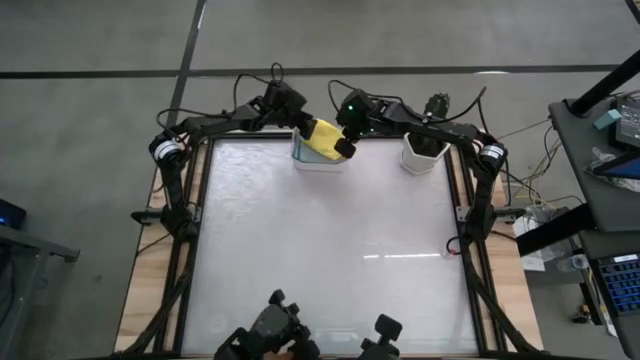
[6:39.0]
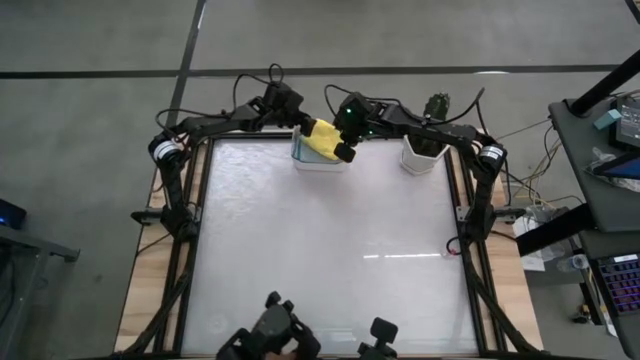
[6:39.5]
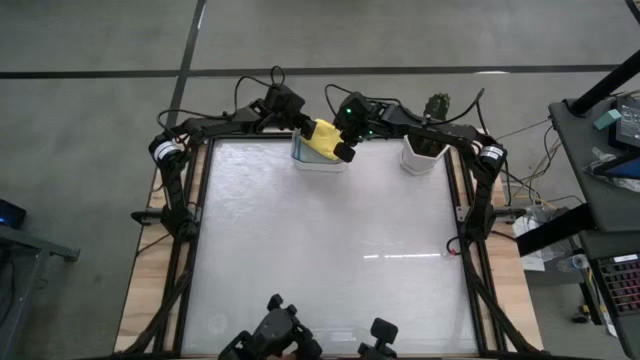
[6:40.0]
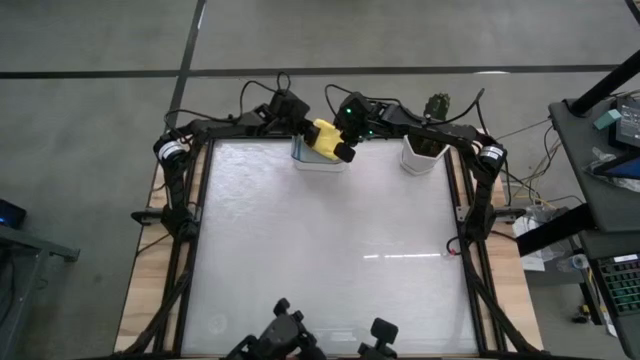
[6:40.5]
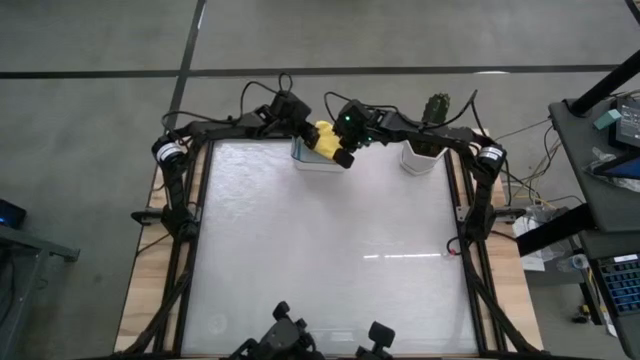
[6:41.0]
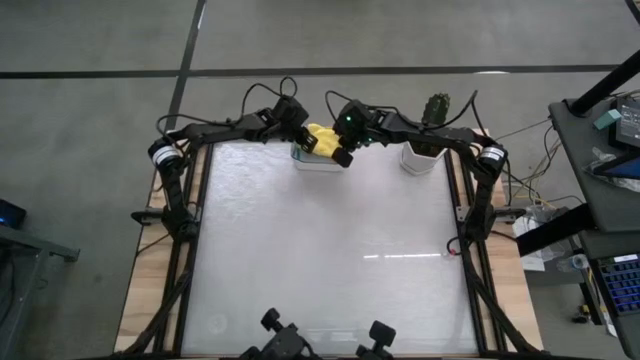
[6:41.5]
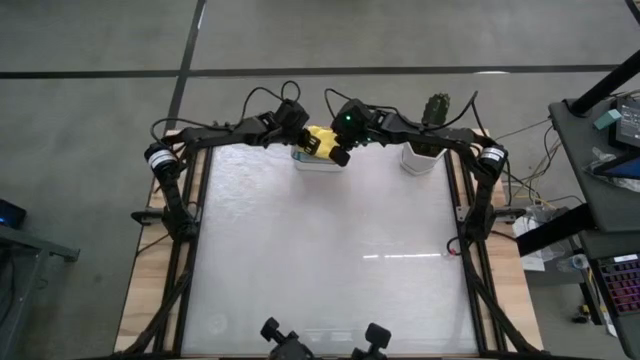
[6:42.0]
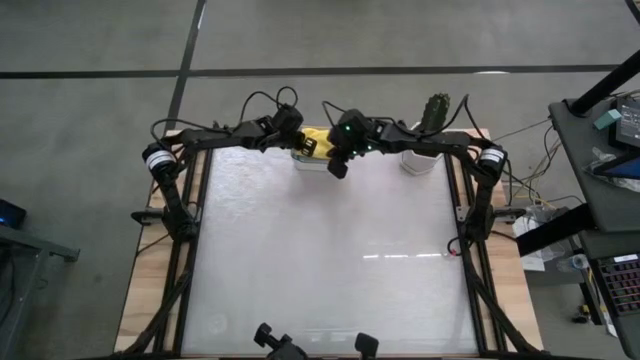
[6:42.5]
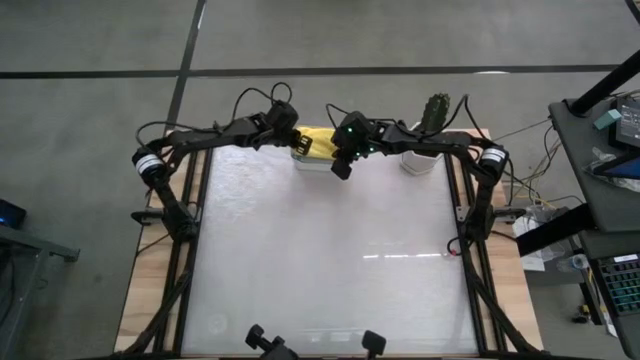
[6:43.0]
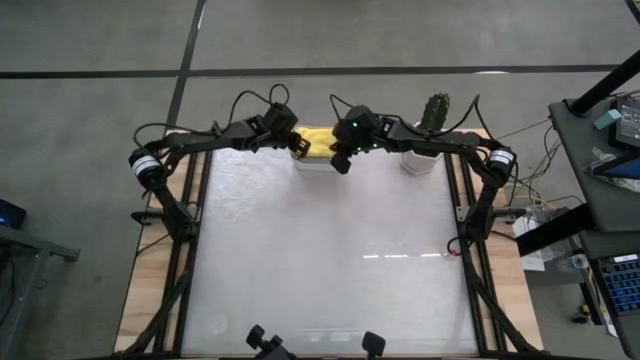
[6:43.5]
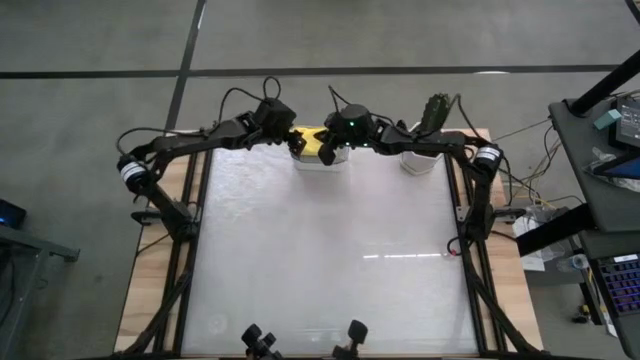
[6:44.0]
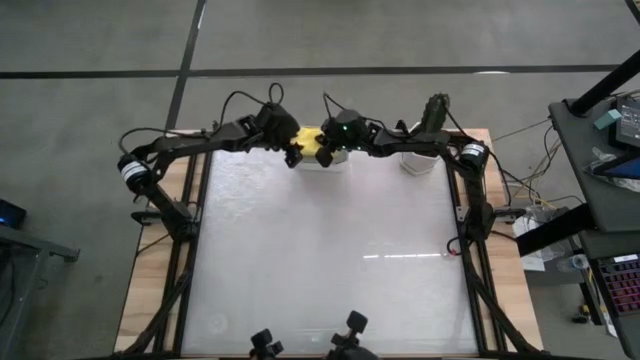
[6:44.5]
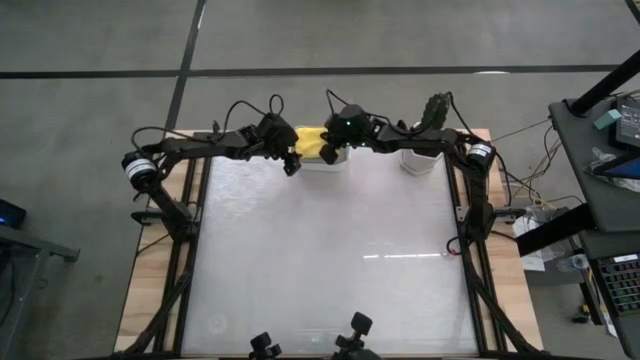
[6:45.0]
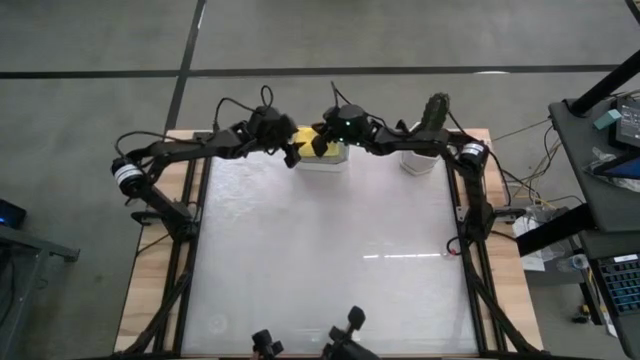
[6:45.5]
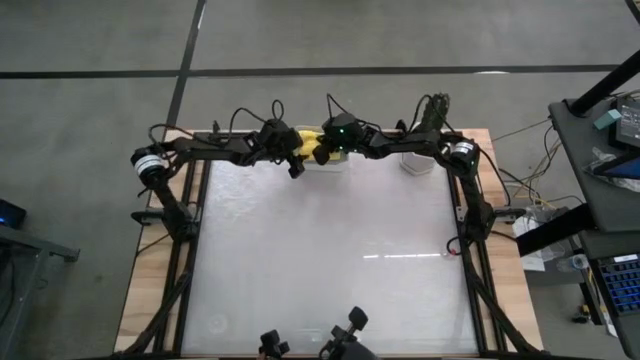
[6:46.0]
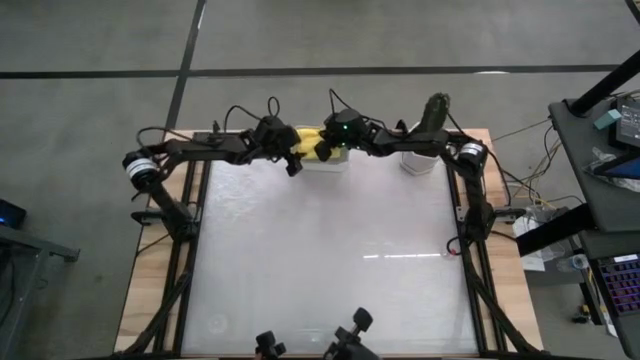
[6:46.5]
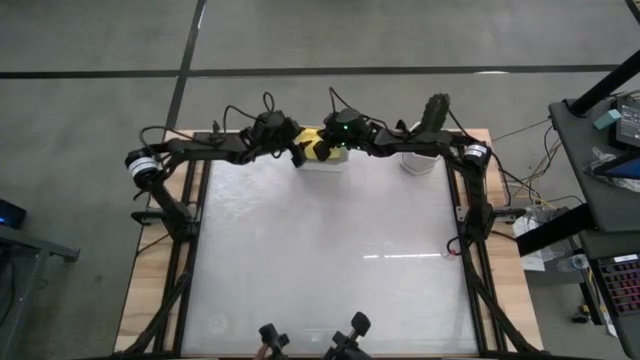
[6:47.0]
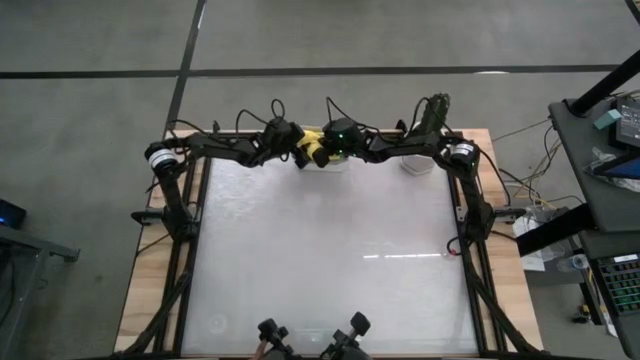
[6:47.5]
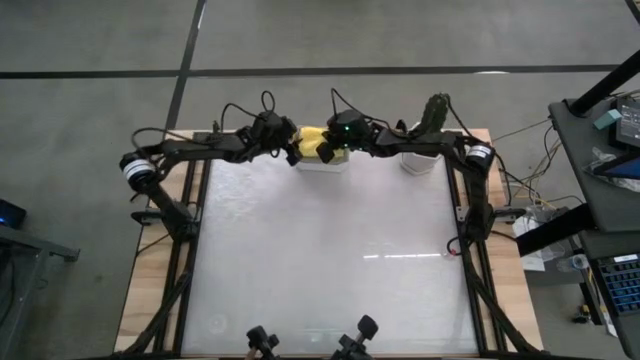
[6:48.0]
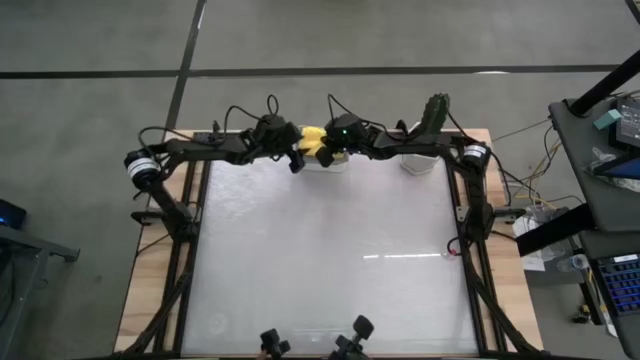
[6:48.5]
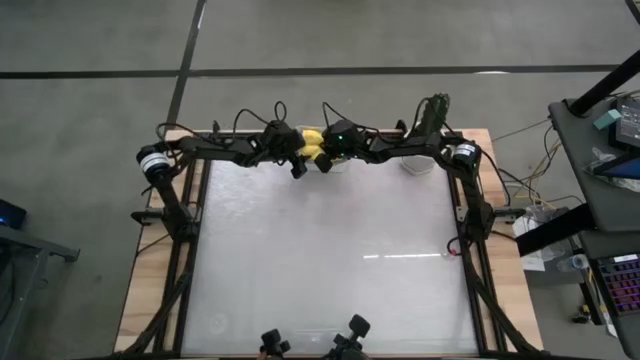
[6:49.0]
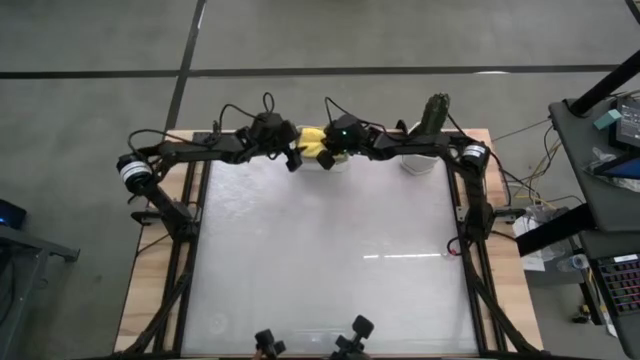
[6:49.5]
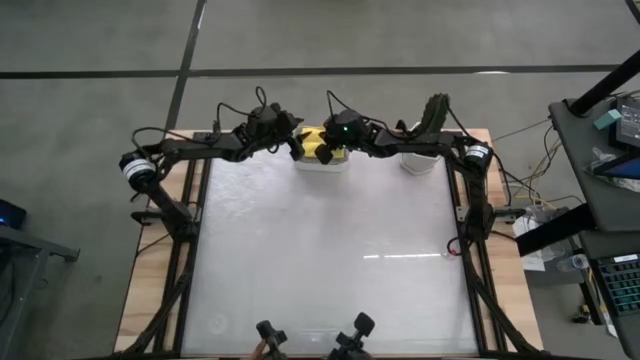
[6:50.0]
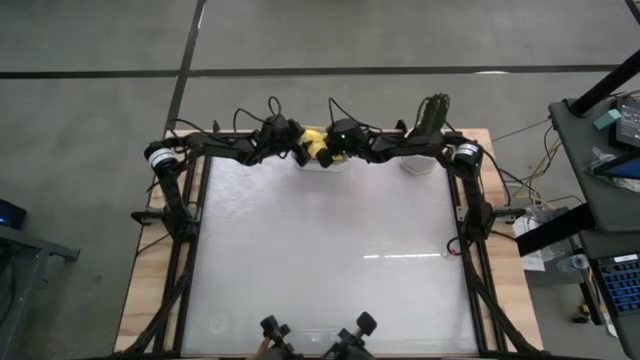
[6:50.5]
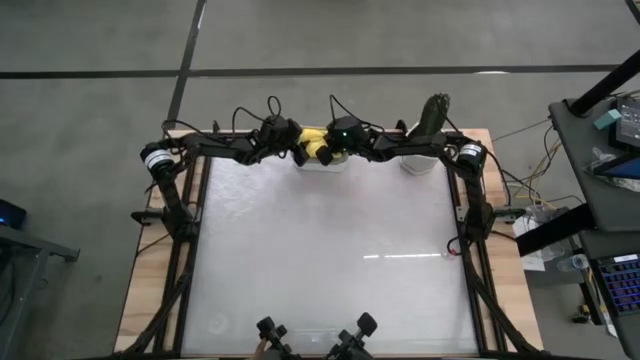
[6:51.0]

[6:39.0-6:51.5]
Task: Fold microfiber towels
Put the yellow cloth into the bin

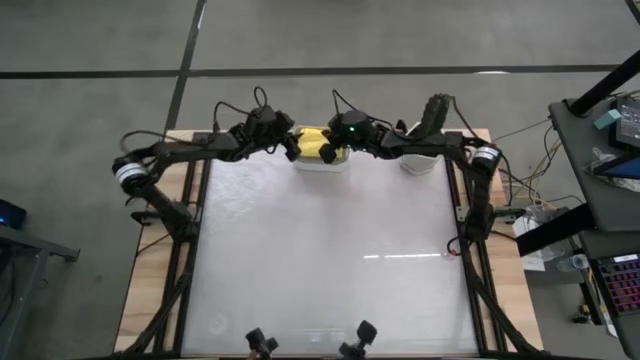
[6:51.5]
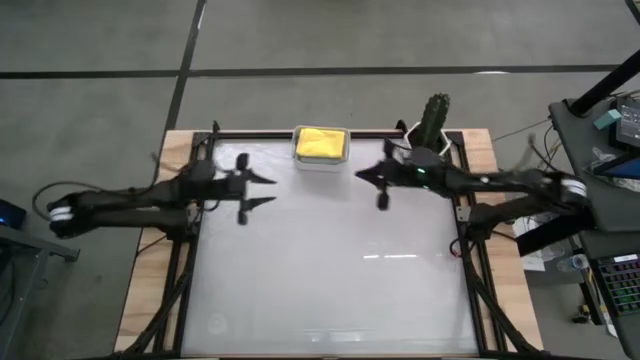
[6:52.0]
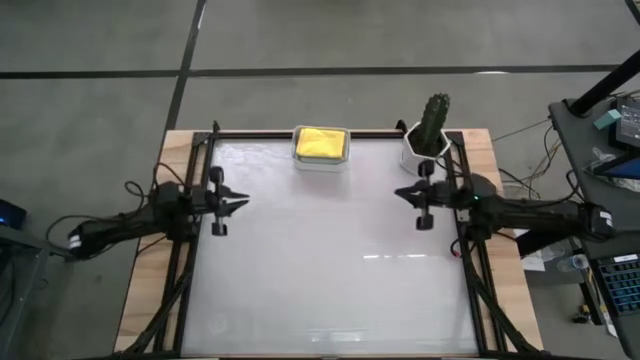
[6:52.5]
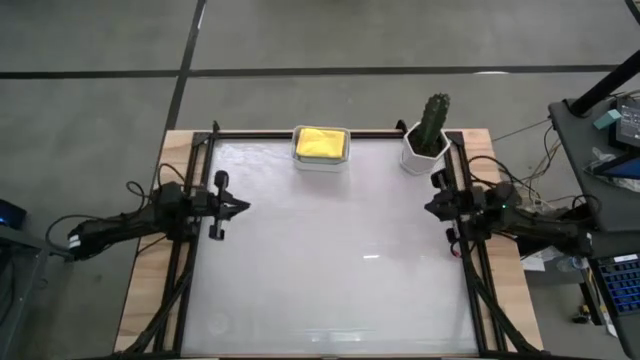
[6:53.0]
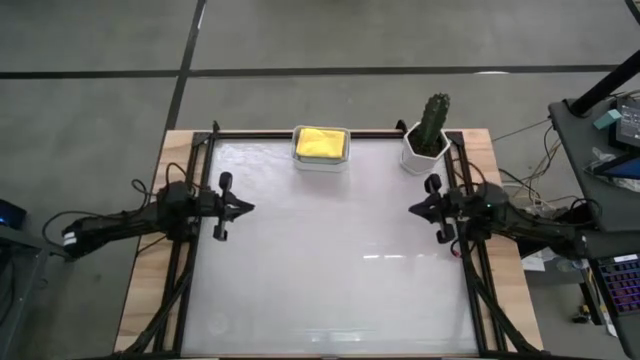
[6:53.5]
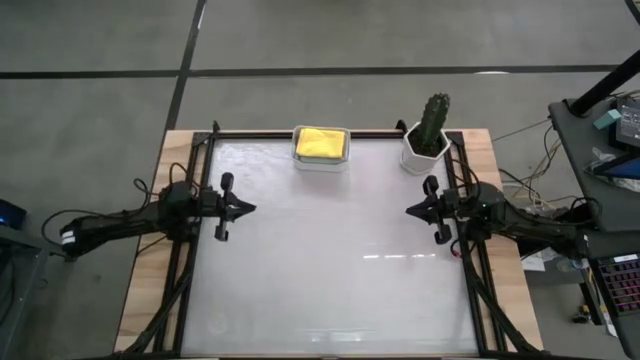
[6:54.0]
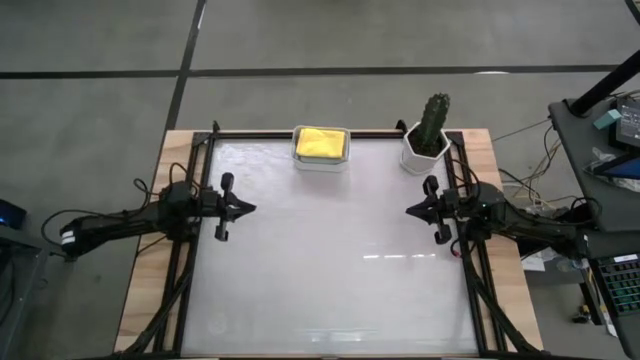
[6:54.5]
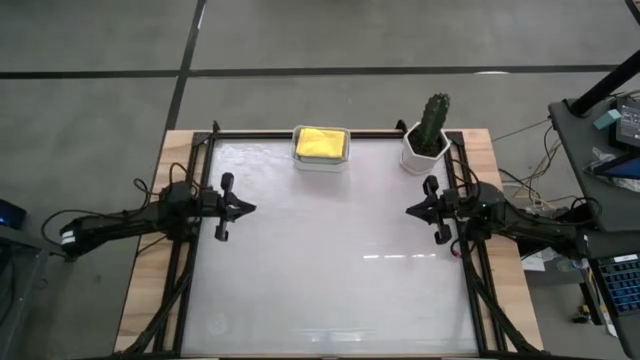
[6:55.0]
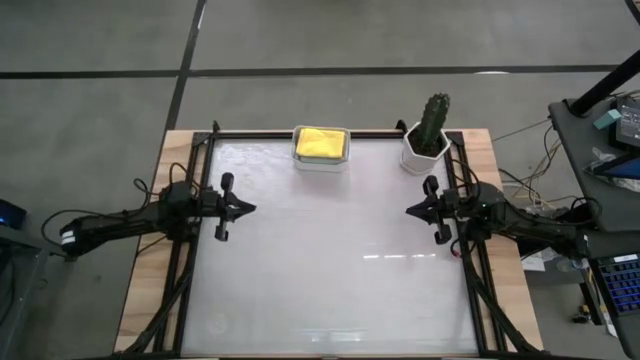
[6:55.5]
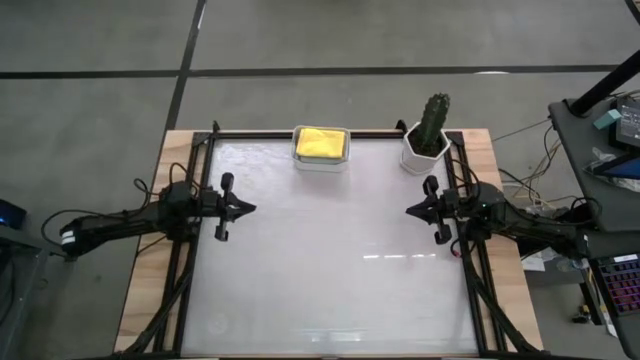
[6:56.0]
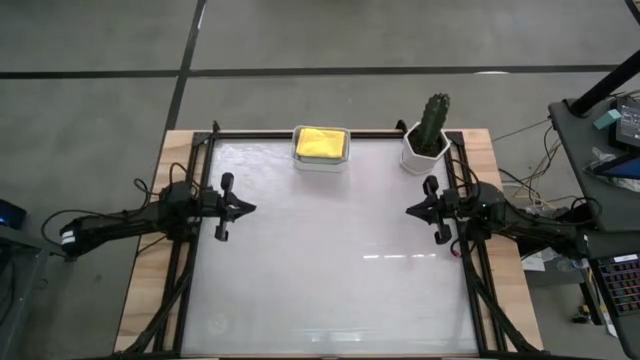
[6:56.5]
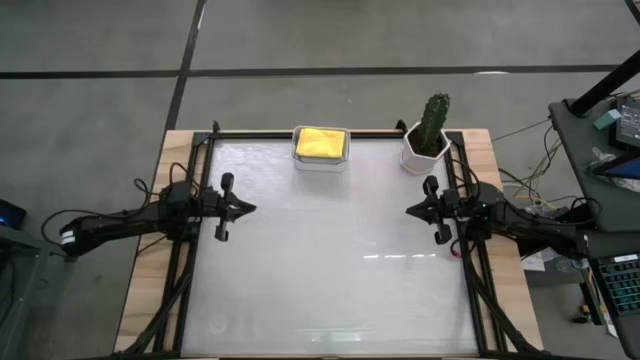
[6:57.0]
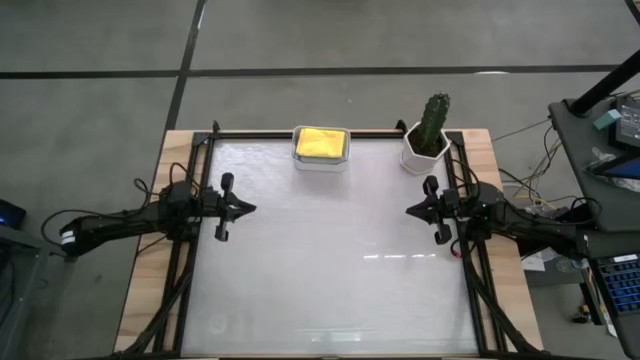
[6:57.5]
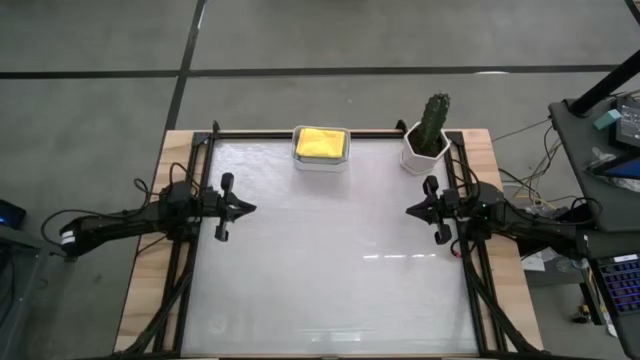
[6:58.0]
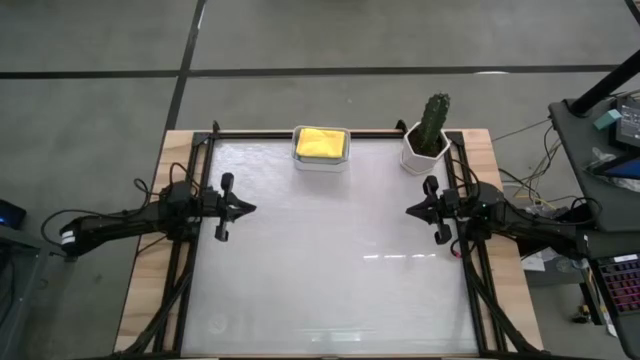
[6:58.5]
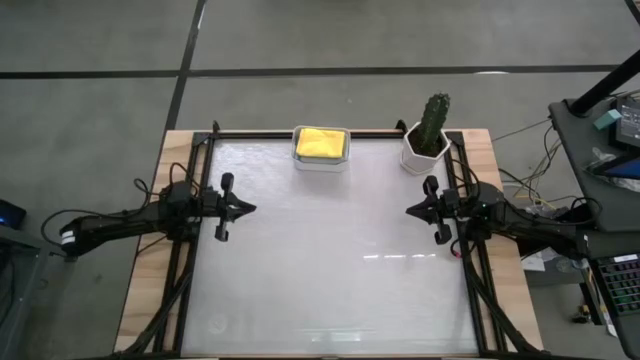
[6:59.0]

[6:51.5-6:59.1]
Return to Home Position
